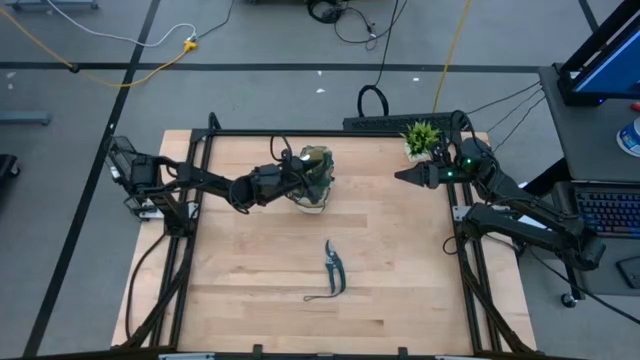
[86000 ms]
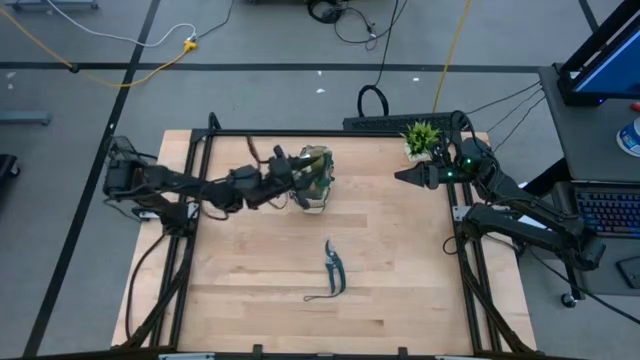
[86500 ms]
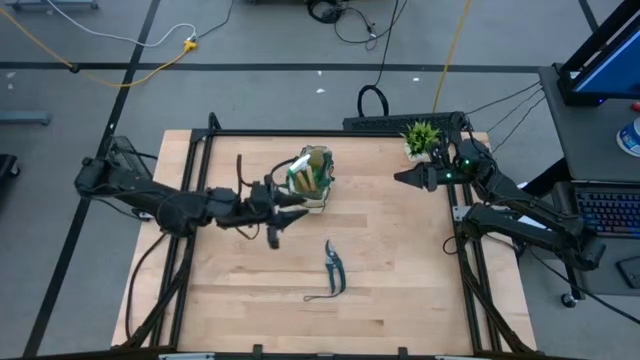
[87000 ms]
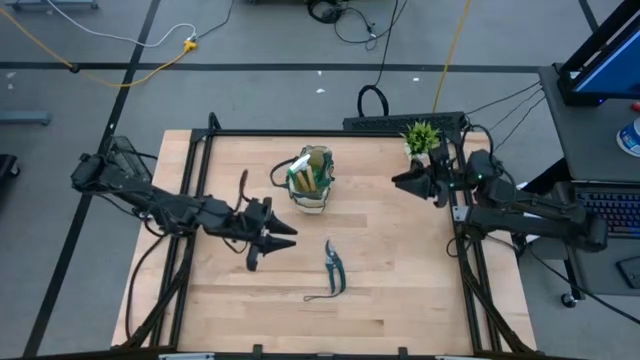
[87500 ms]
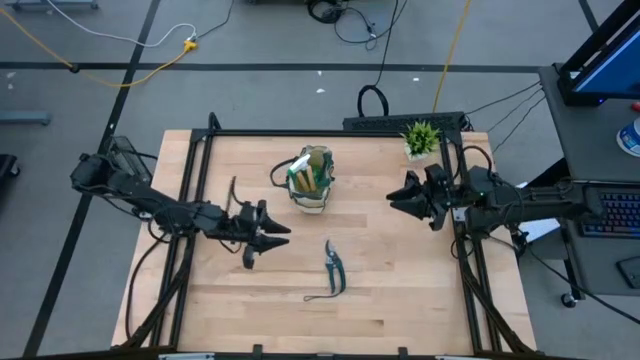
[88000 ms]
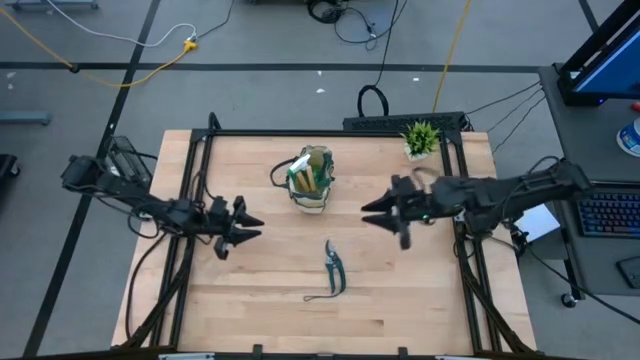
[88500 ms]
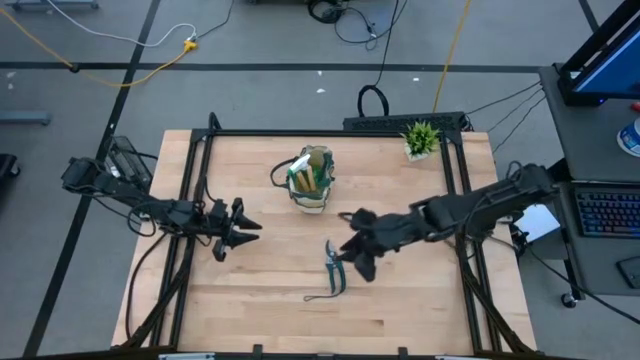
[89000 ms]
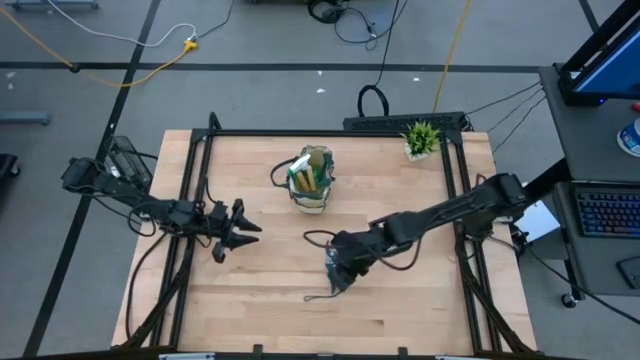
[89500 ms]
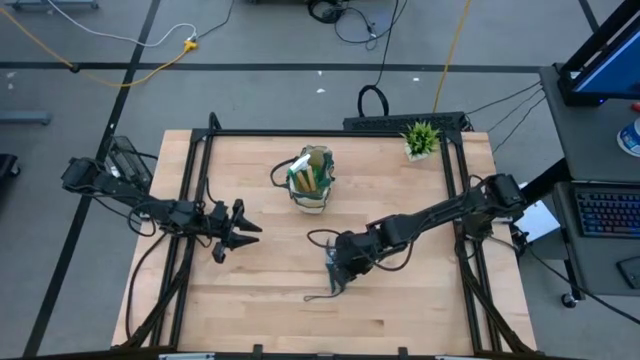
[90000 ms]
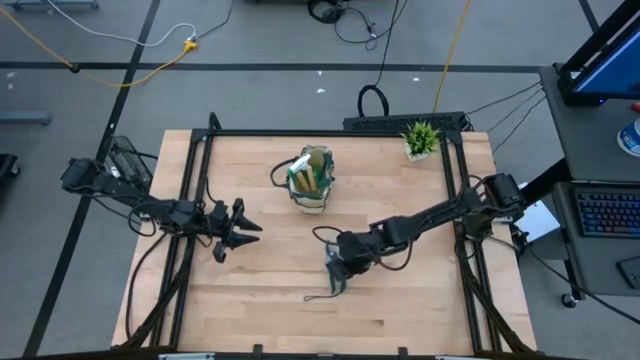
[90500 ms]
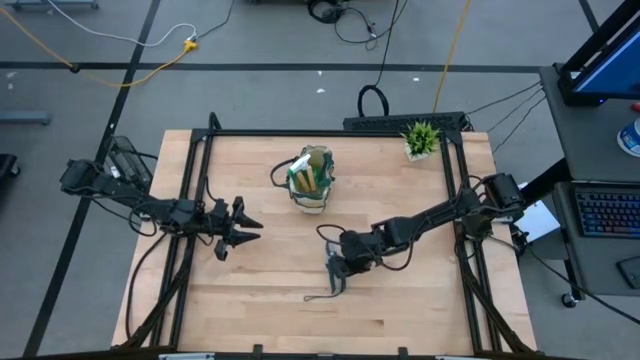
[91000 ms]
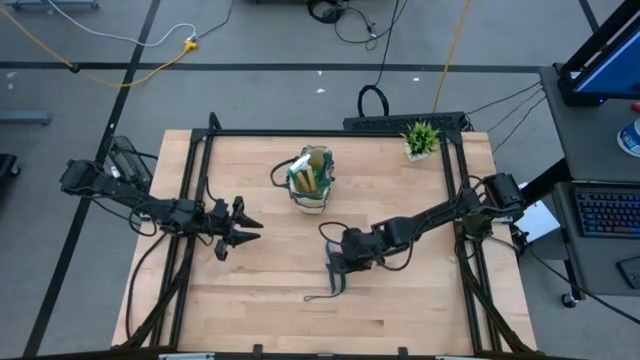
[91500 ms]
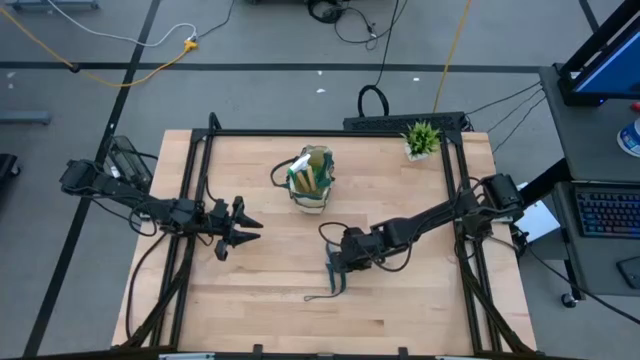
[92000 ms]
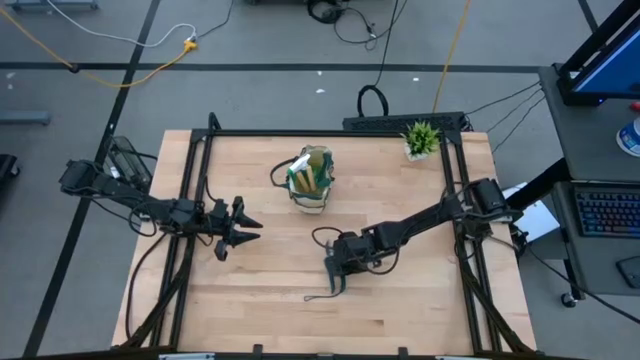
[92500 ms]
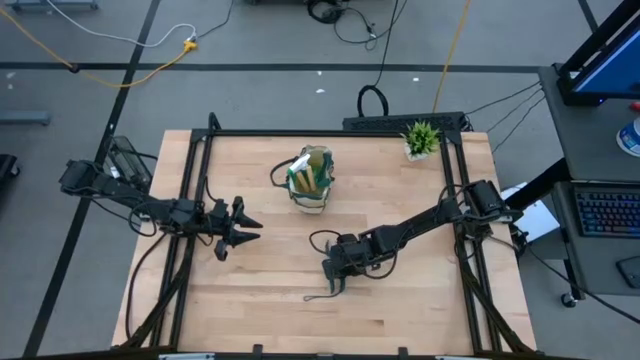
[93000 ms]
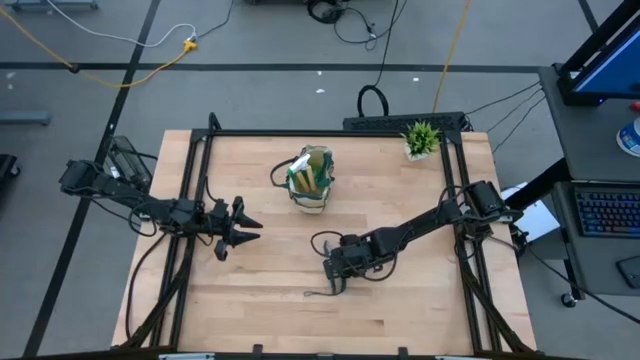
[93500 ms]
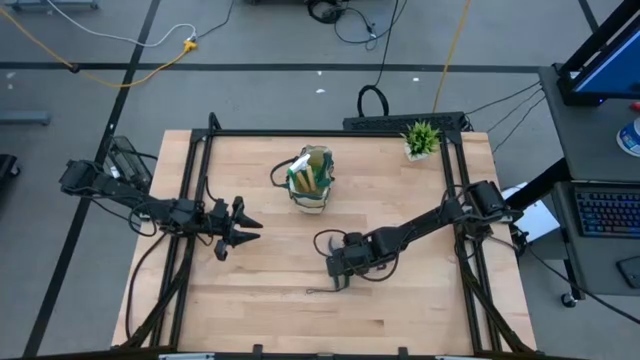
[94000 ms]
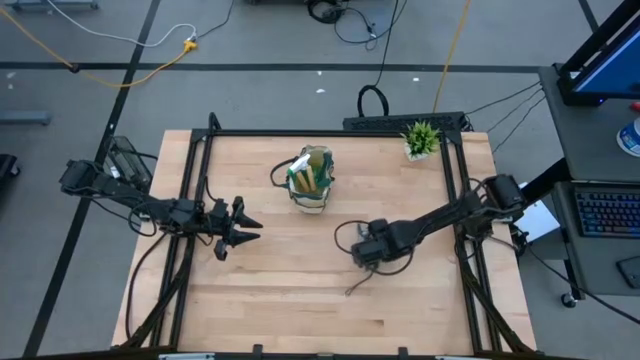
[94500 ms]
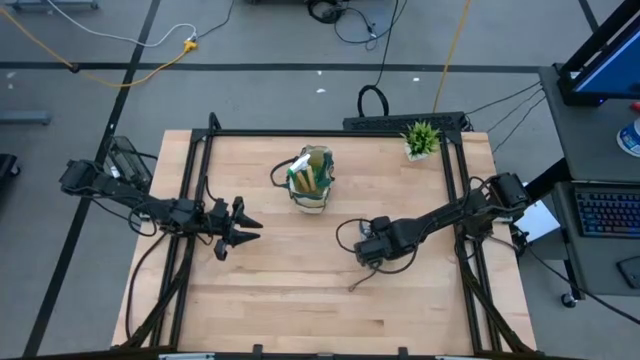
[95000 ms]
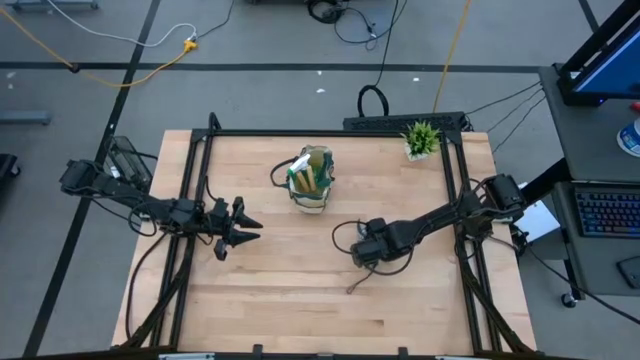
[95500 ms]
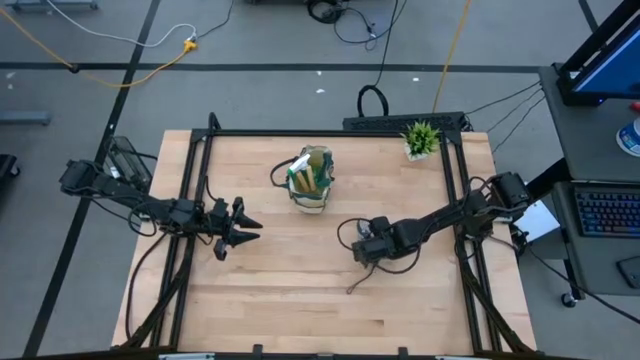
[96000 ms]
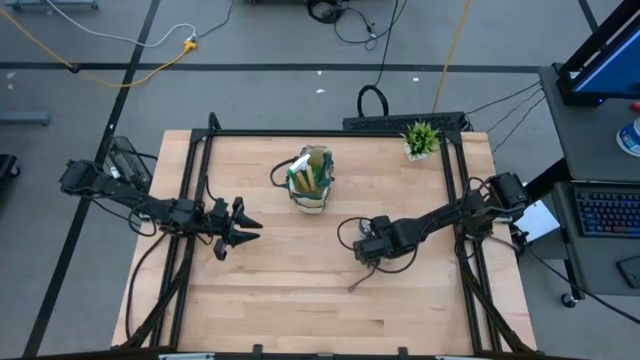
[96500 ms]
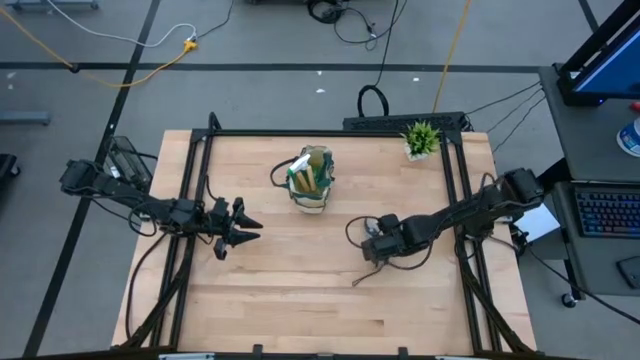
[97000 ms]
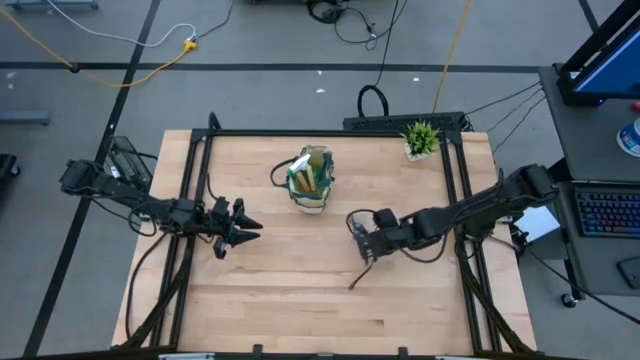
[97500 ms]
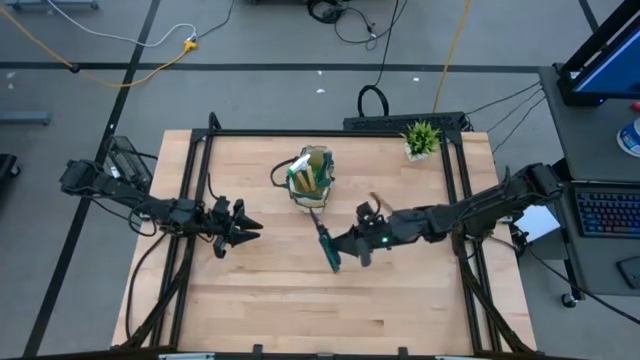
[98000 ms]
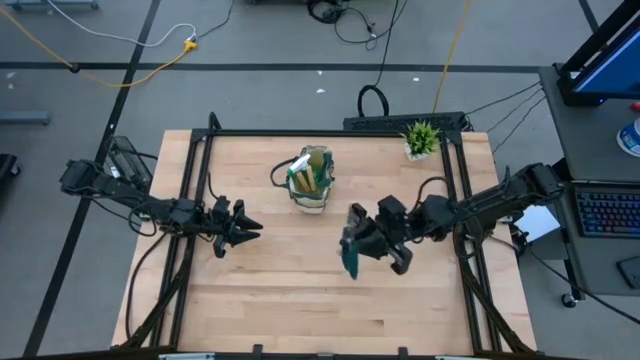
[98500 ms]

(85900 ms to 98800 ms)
Task: Pick & Place Garden tools in Gardening bag
Put the green shear scissors into the top gardening bag

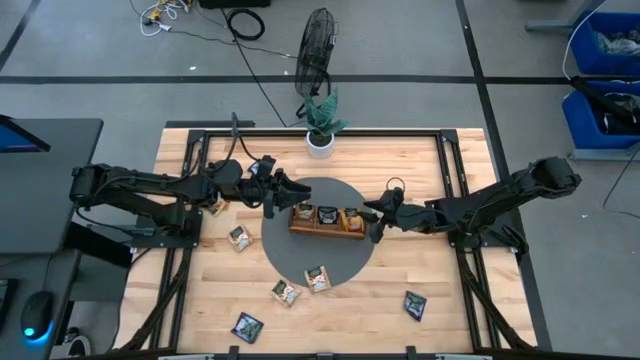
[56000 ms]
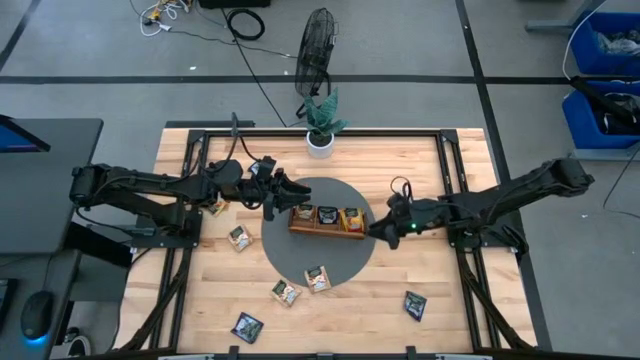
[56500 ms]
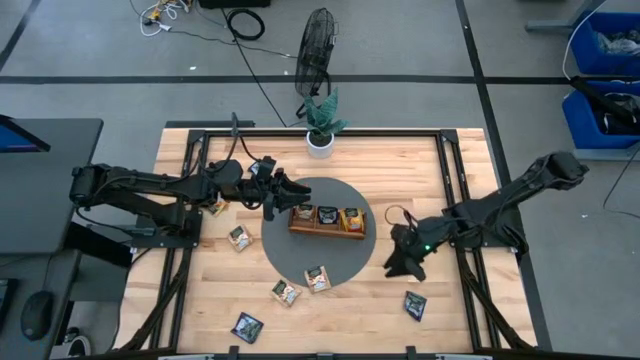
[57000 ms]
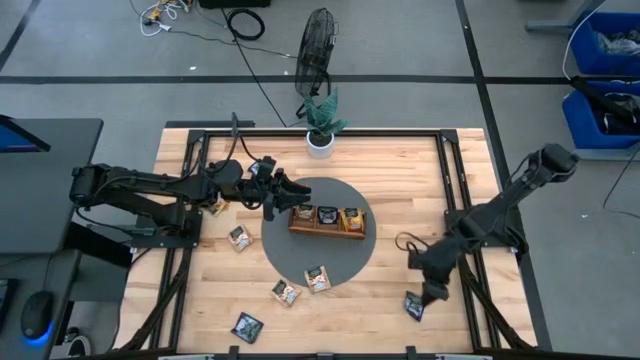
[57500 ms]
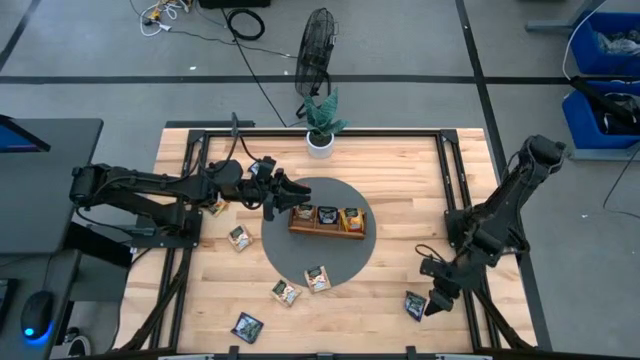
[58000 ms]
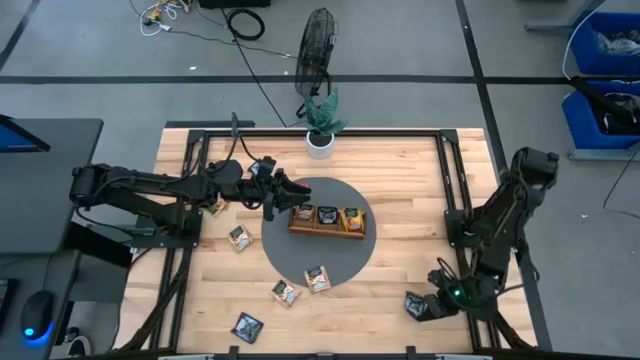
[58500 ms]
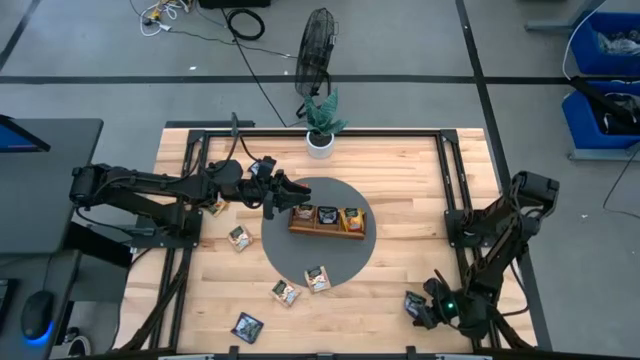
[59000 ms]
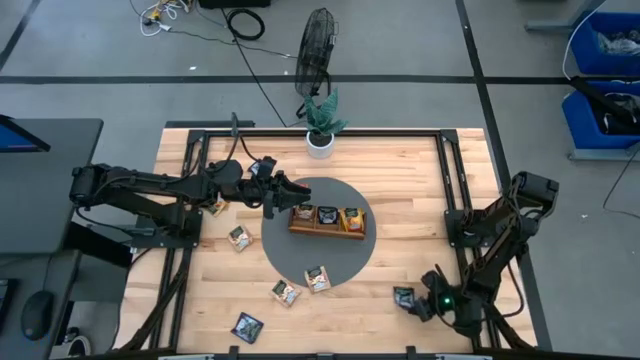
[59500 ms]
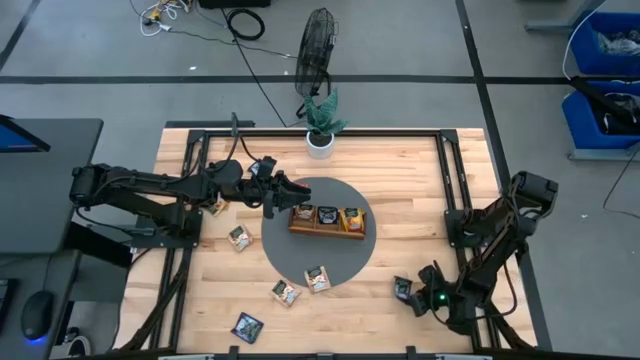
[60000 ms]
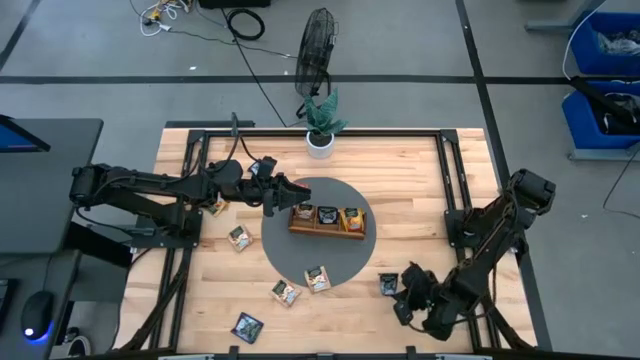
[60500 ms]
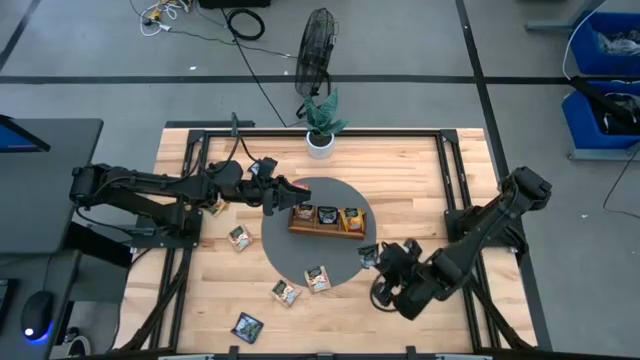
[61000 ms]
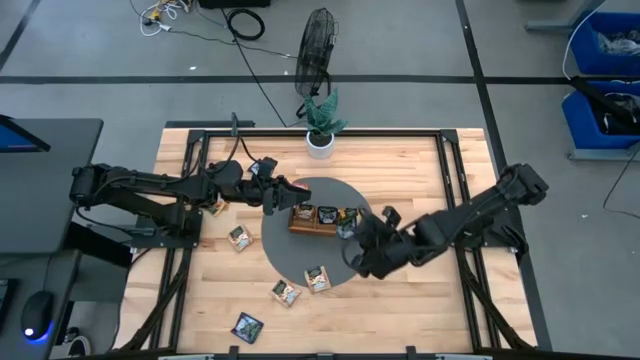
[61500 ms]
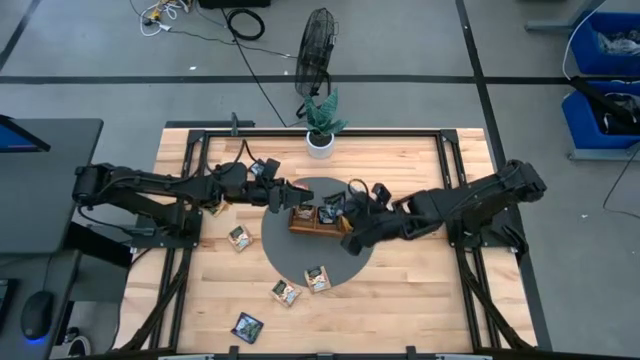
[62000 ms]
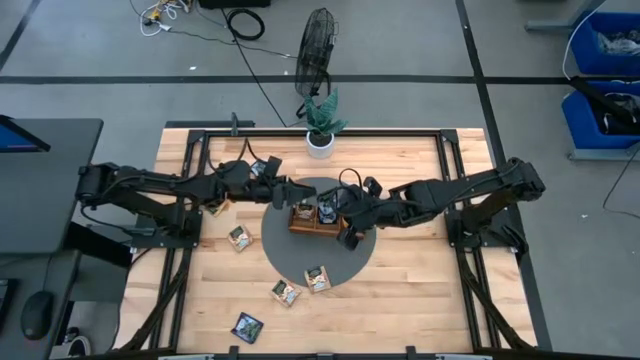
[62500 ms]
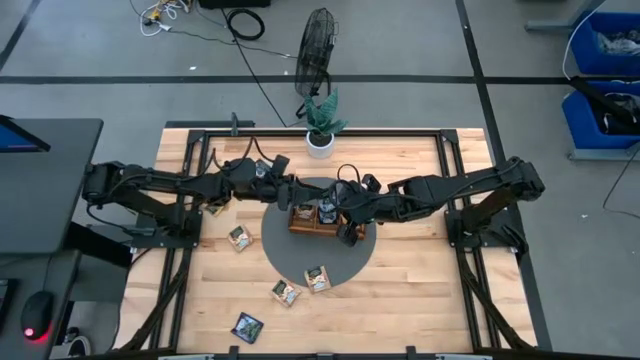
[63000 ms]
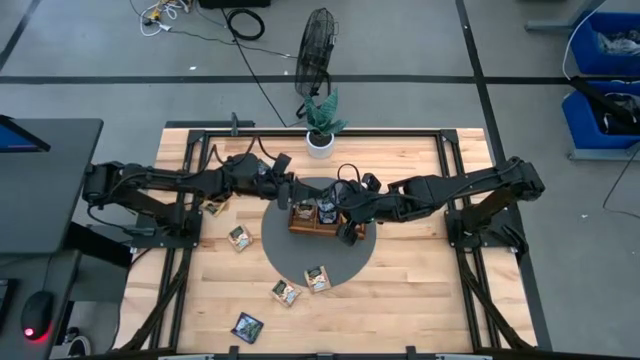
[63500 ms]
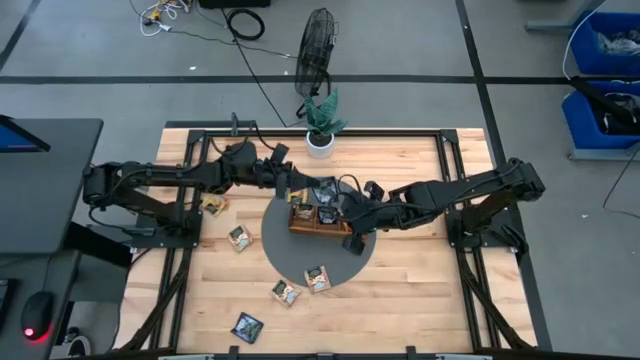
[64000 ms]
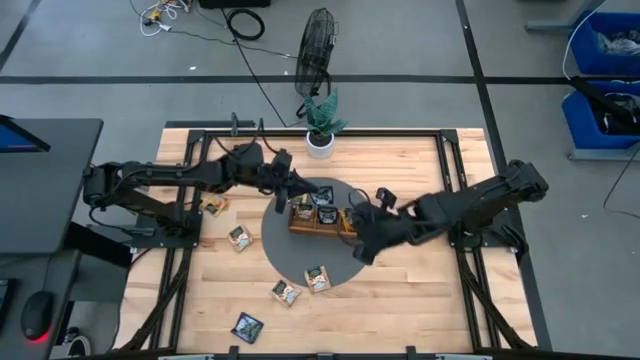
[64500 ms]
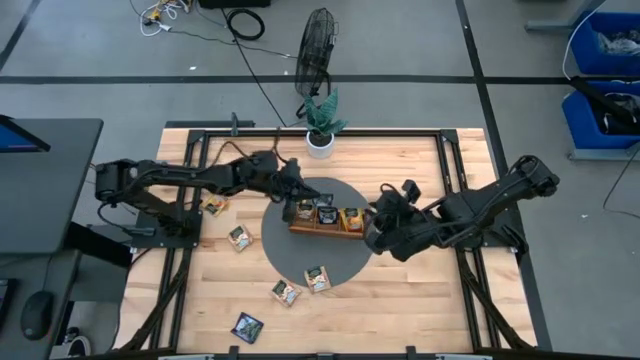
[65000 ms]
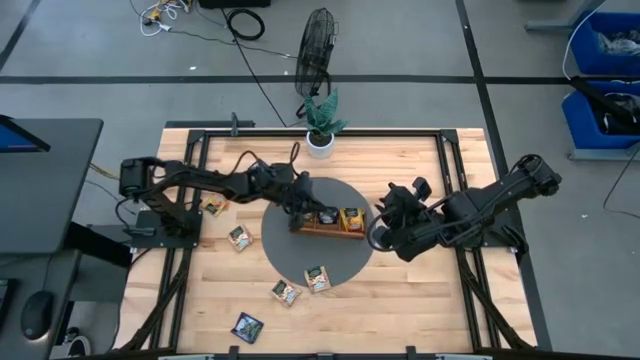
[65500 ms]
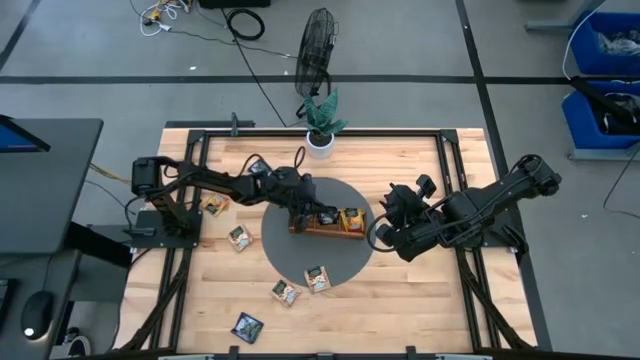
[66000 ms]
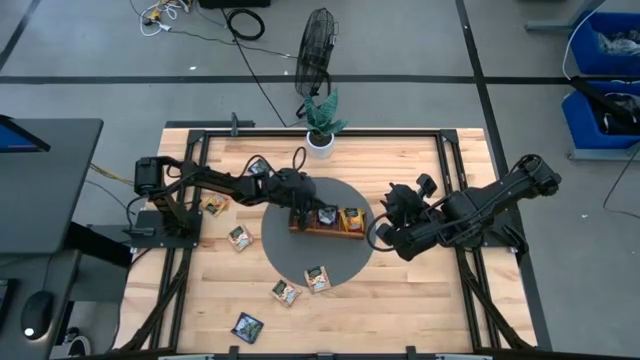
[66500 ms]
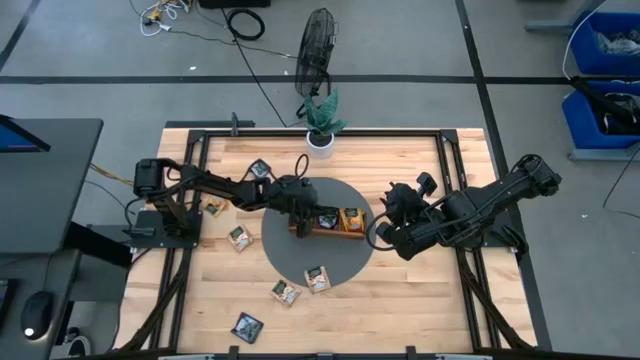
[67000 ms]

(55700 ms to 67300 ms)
Task: Pick & Place Tea
Put the blue tea bag into the middle section of the wooden organizer
